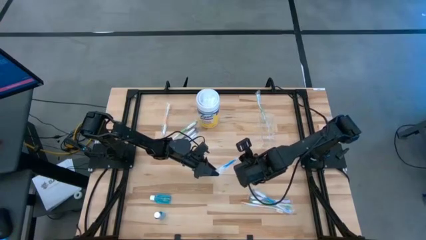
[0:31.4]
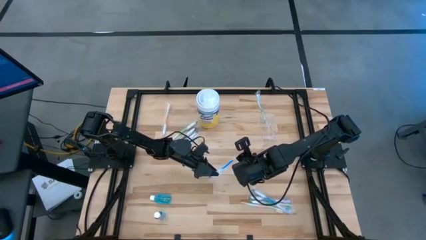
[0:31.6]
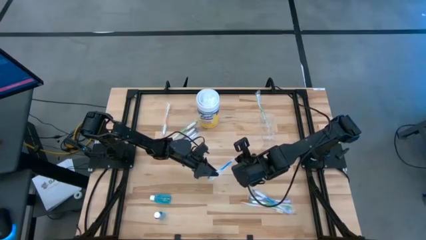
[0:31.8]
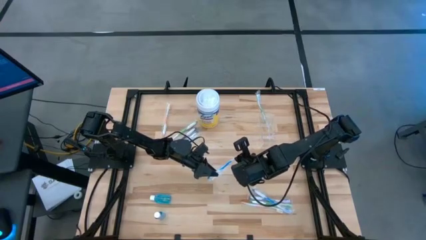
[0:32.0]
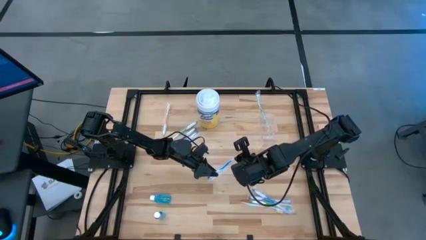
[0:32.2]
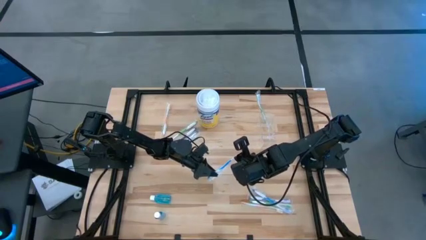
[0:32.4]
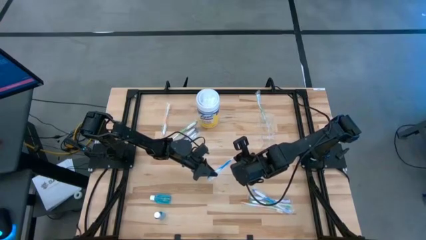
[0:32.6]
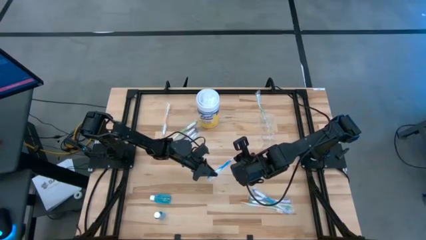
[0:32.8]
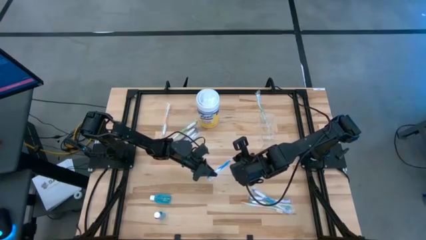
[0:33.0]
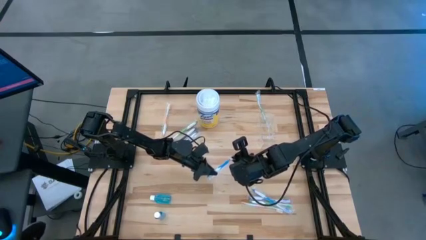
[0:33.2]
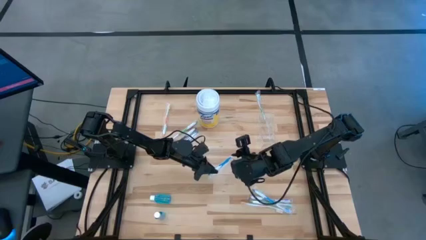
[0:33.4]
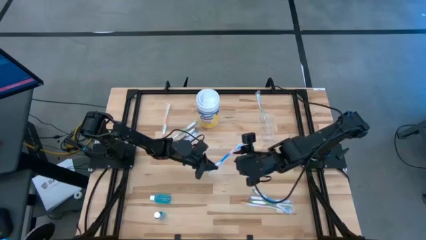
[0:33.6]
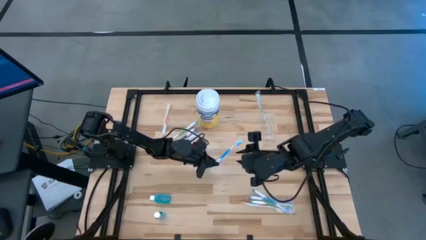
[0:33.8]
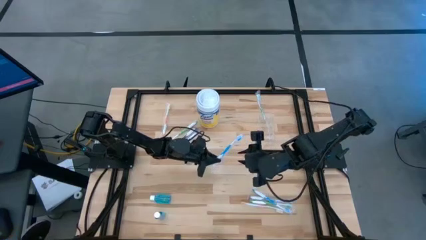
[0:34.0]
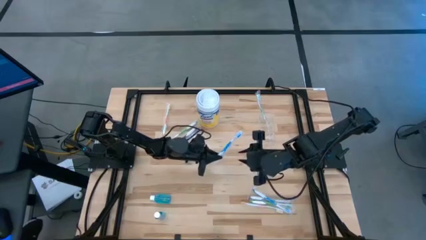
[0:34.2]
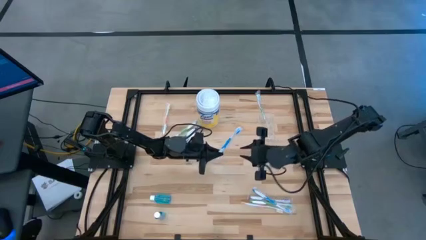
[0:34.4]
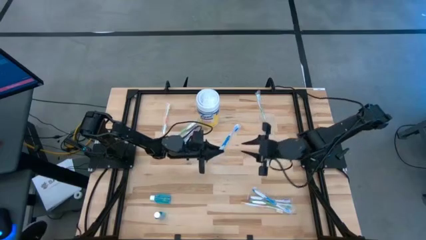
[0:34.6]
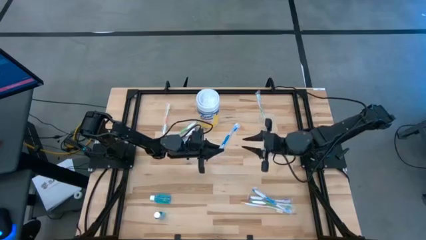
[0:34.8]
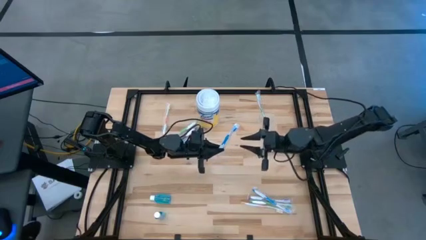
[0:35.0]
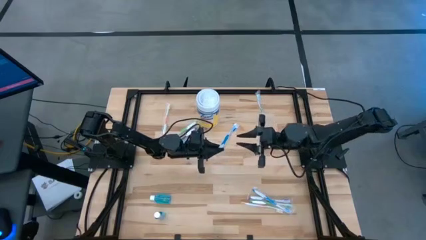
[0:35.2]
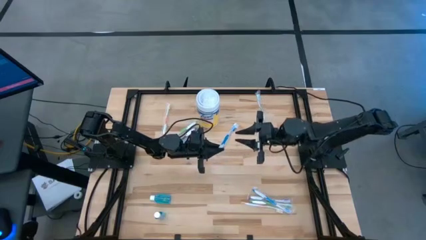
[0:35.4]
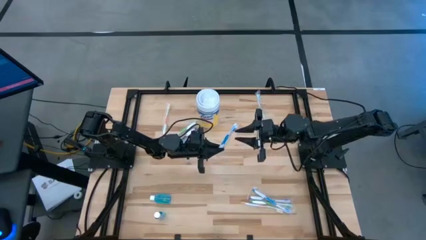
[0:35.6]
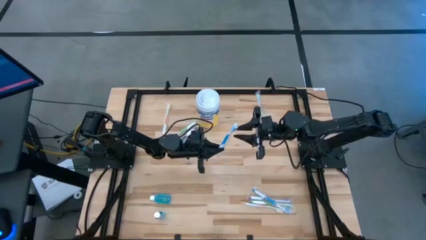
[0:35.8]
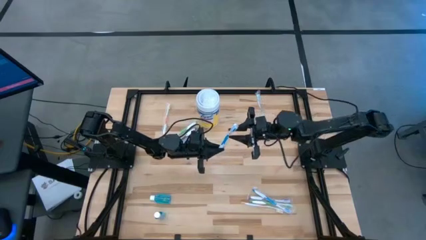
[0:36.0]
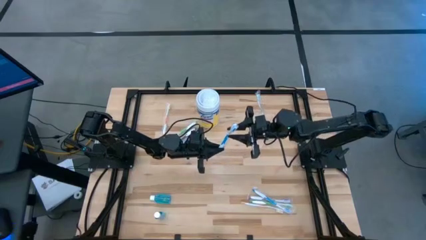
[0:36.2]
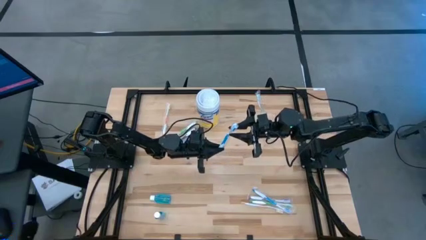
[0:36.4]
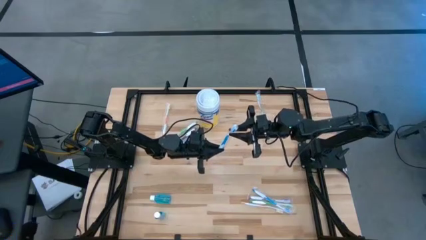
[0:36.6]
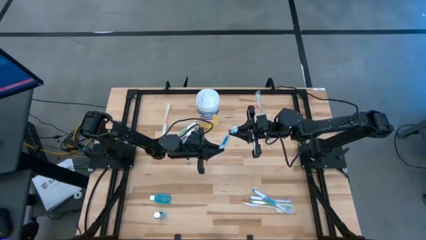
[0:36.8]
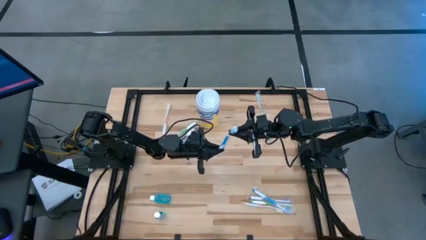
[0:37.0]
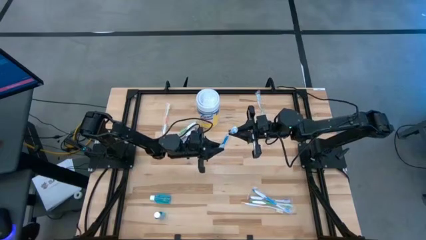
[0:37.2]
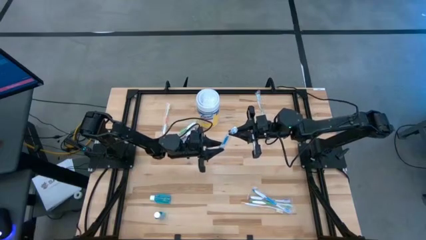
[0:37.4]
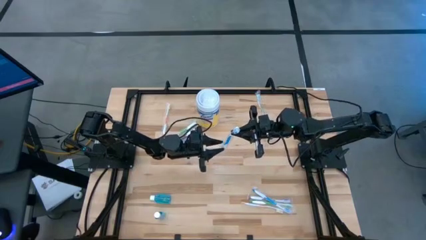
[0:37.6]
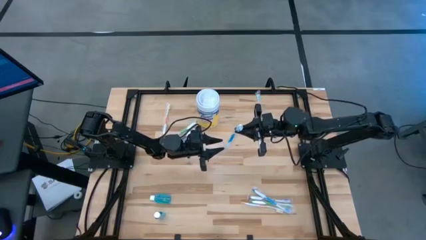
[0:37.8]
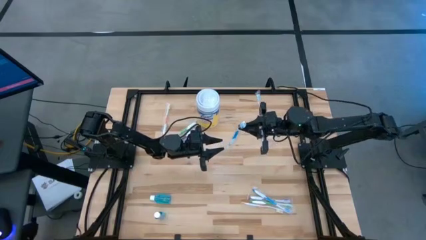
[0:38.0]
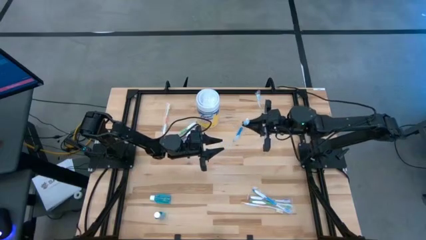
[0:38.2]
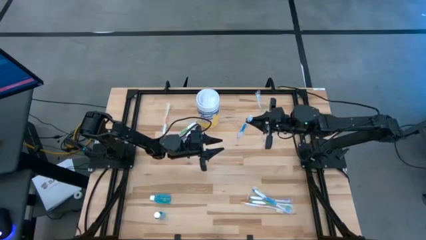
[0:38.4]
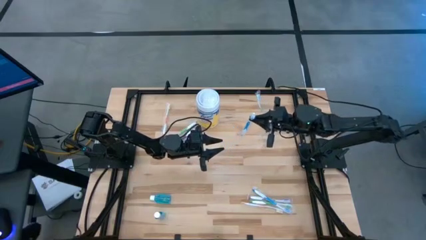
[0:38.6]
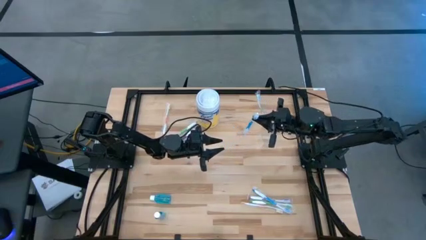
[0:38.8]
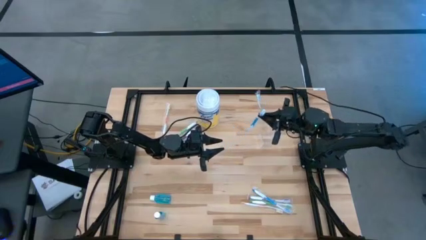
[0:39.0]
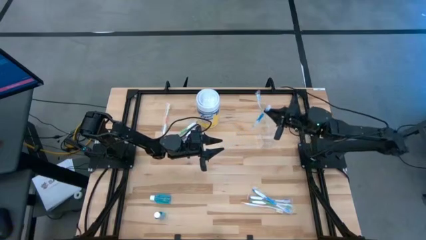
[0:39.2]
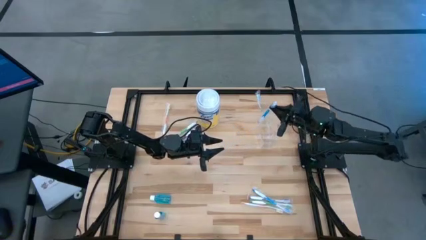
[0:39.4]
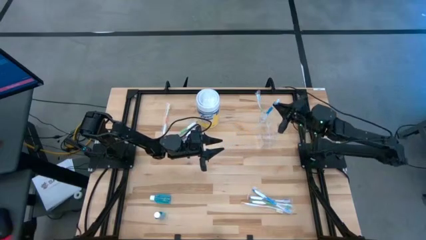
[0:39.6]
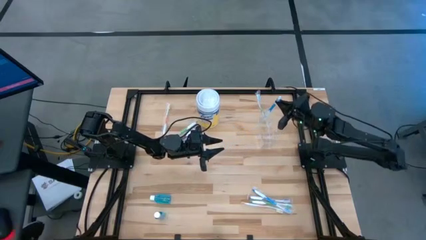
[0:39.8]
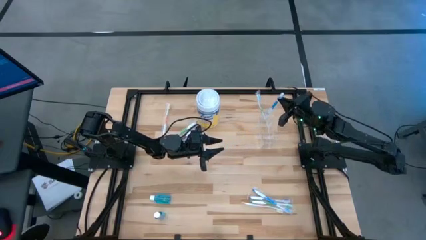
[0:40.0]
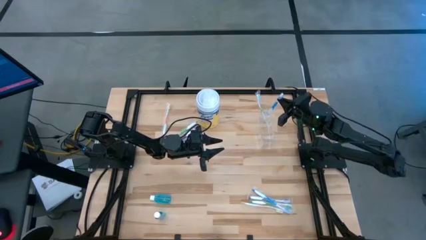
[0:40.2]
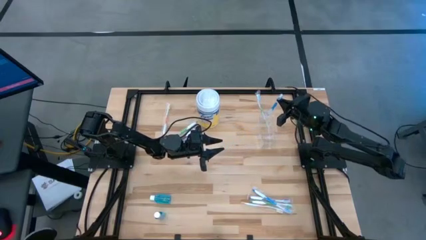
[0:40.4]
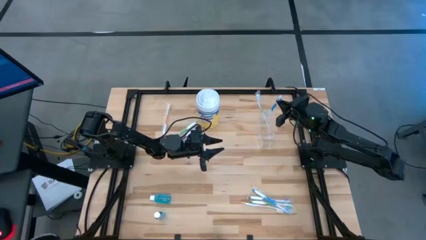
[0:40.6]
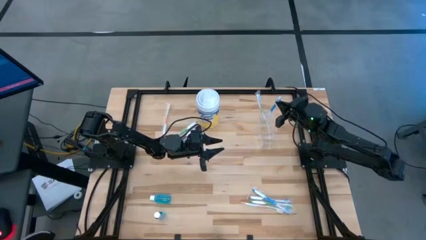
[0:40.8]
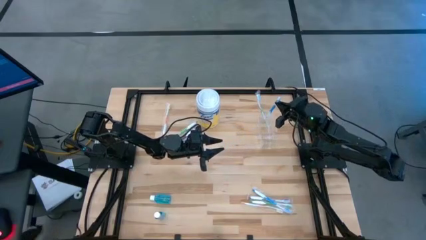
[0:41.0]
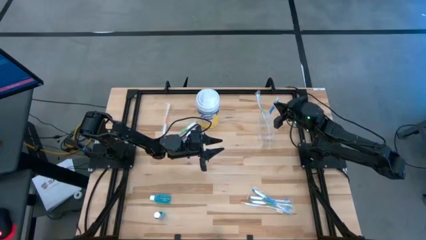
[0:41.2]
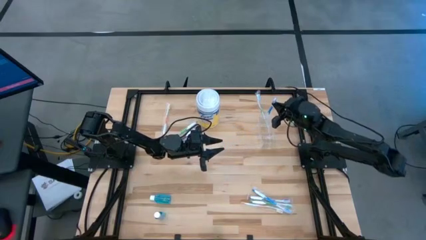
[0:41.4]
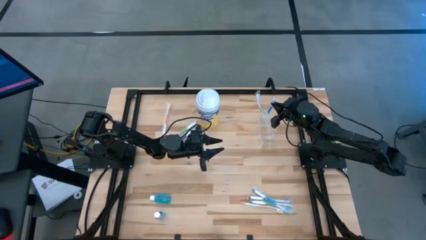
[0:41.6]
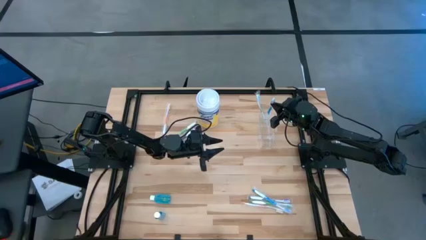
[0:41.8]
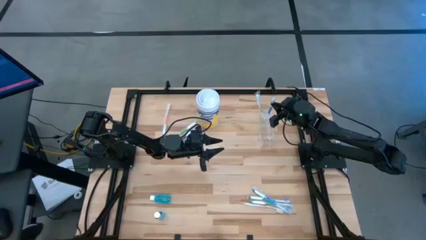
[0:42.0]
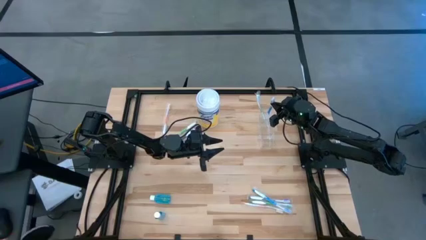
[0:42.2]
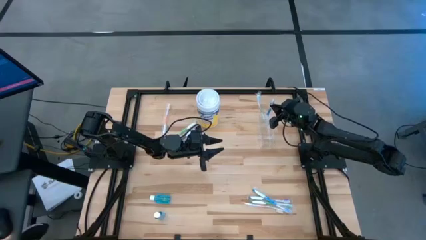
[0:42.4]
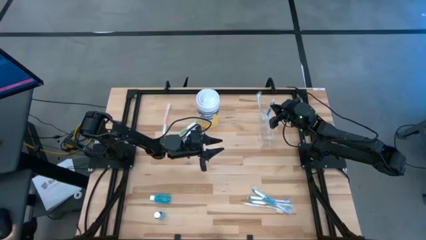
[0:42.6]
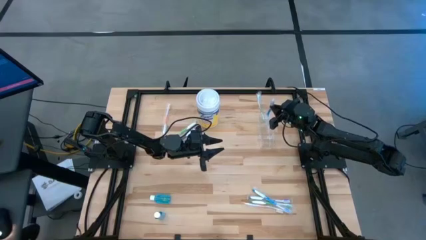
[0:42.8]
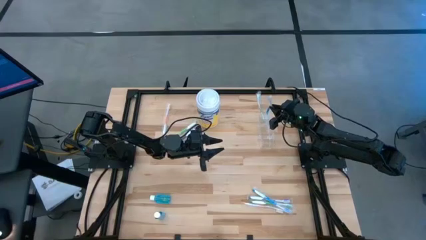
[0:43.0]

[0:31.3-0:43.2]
Task: Pick & Place toothbrushing station
Put the blue toothbrush into the transparent organizer

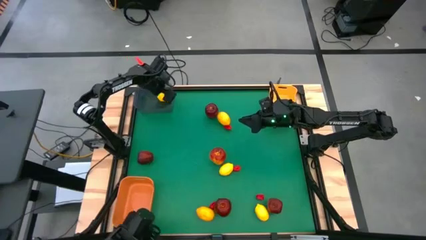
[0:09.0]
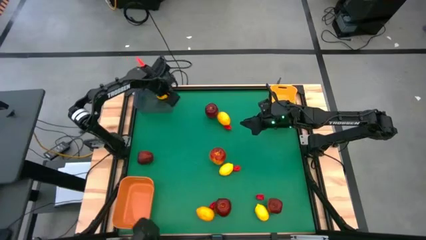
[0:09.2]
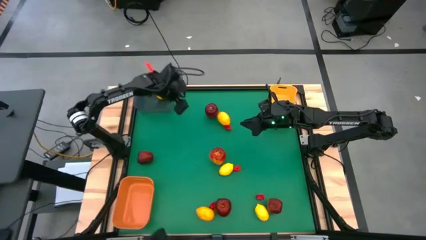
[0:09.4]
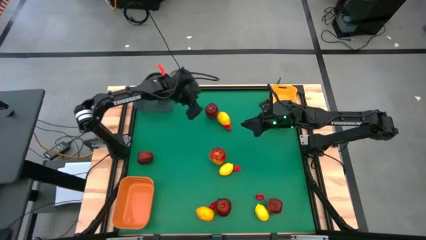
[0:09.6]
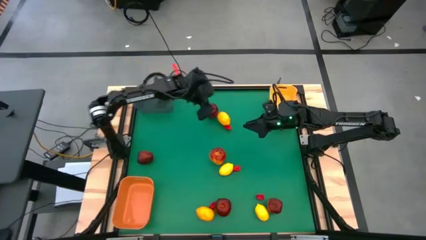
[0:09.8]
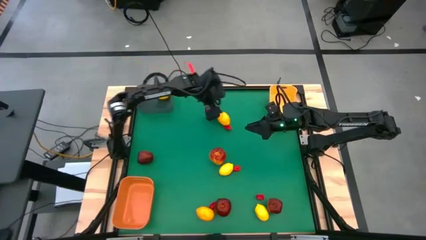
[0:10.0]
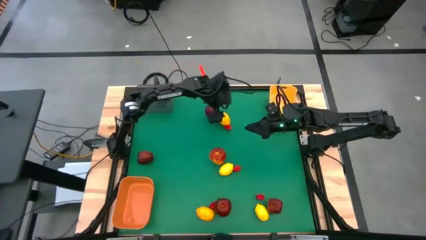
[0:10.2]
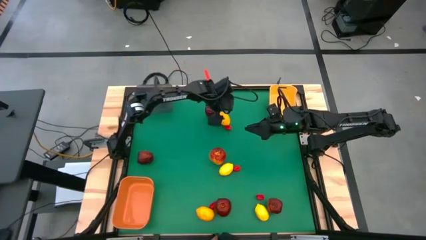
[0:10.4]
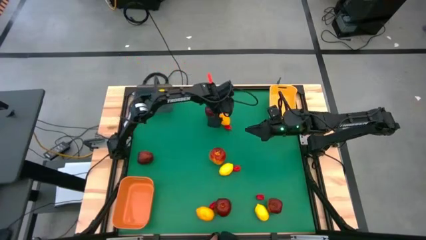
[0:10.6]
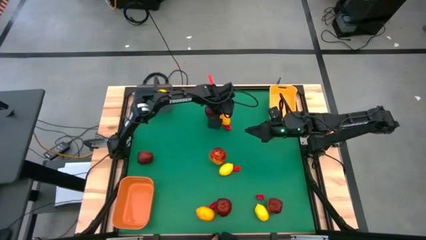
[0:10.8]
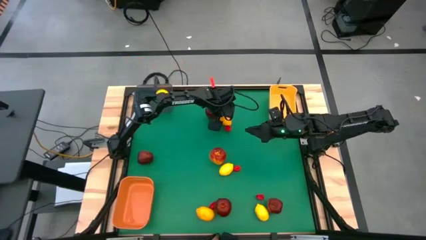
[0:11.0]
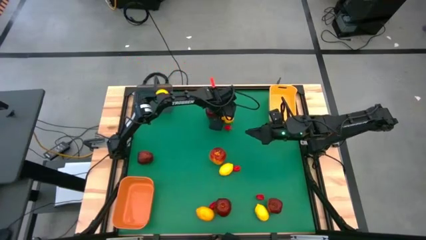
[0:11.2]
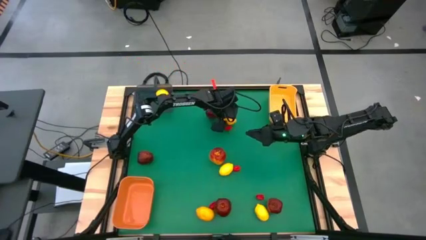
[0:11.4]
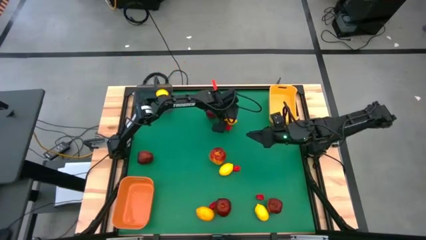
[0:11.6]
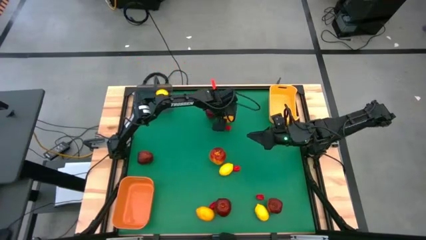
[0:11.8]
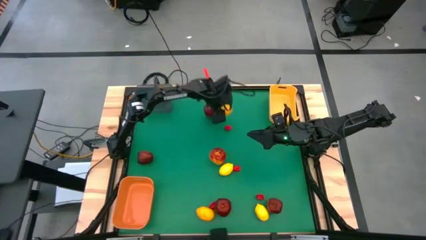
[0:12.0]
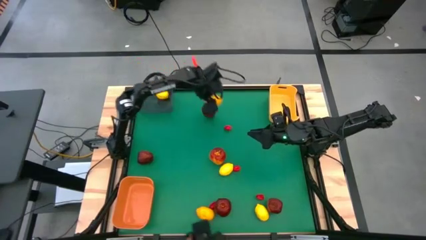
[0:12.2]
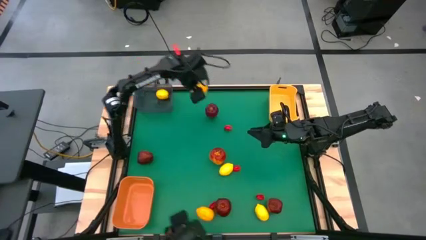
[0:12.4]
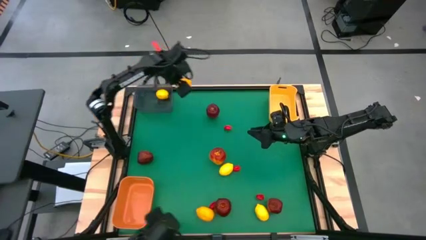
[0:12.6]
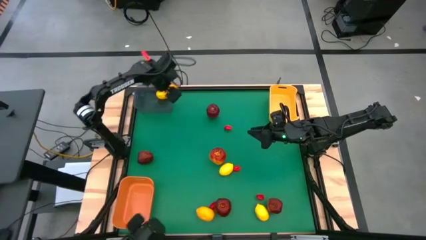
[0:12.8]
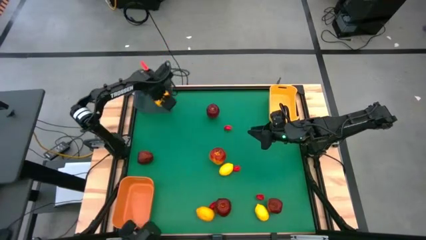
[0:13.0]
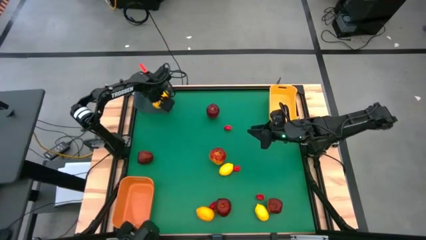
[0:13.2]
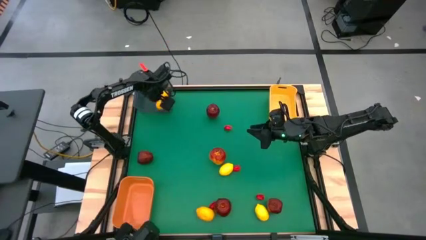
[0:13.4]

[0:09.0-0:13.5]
Task: Sort produce into baskets
Put the top lemon into the gray transparent bin
